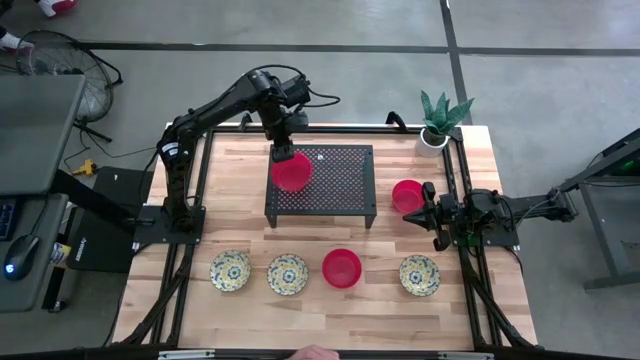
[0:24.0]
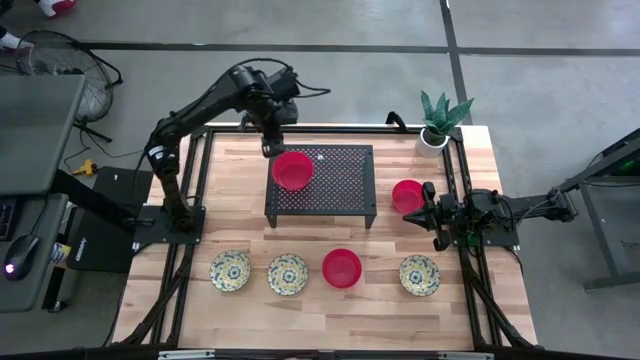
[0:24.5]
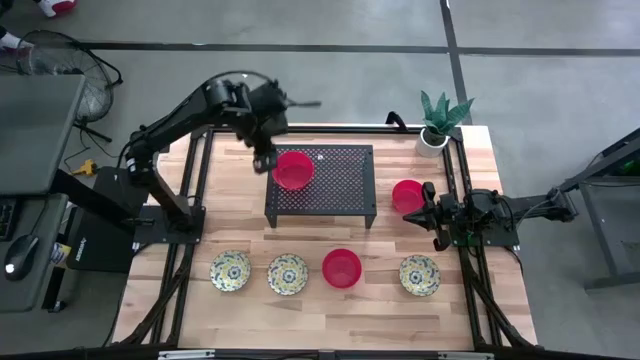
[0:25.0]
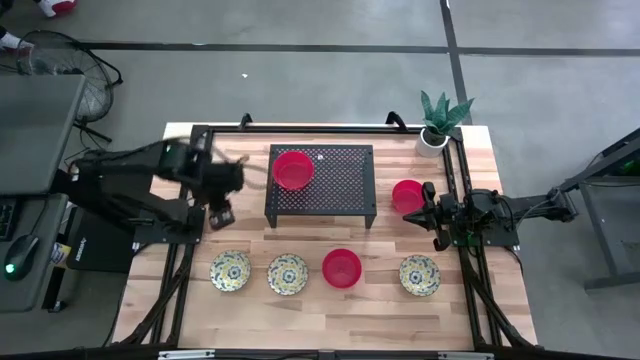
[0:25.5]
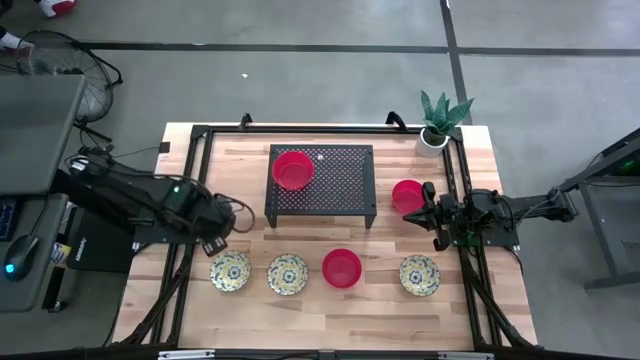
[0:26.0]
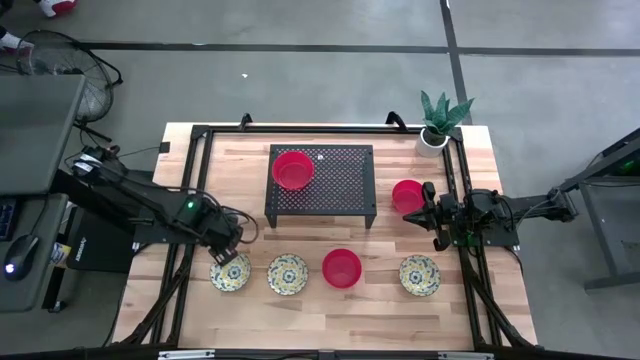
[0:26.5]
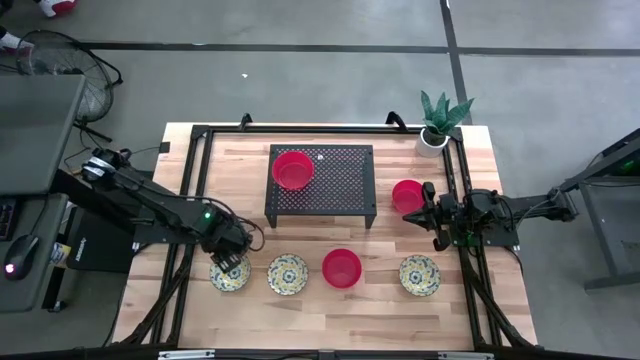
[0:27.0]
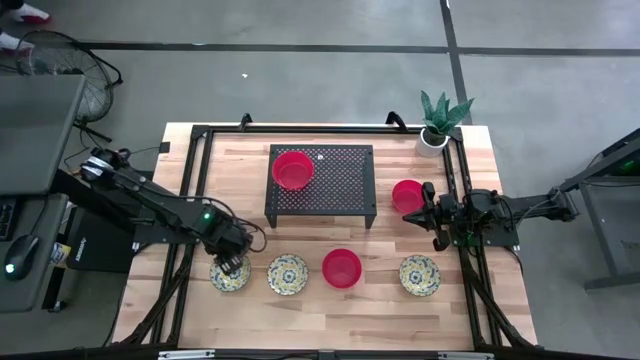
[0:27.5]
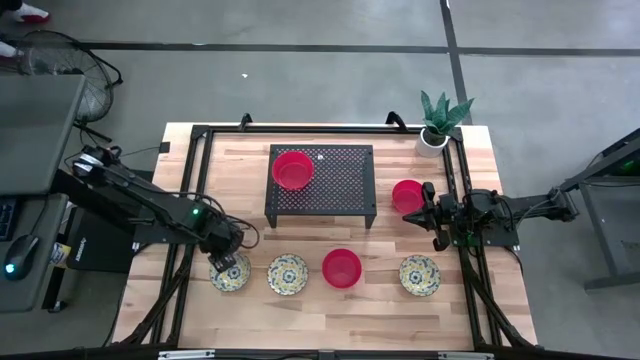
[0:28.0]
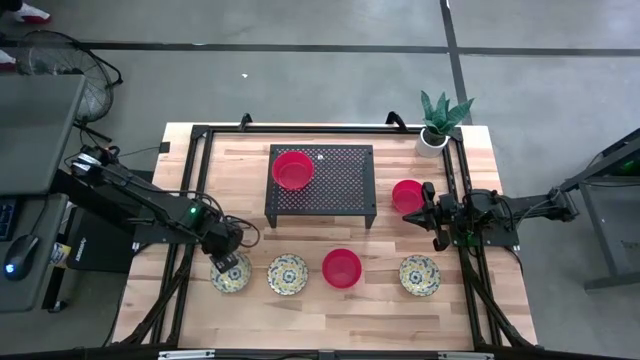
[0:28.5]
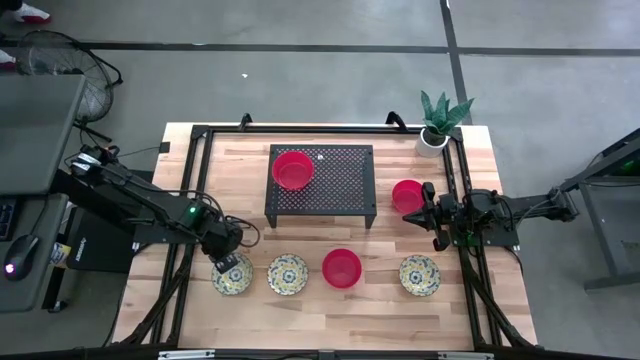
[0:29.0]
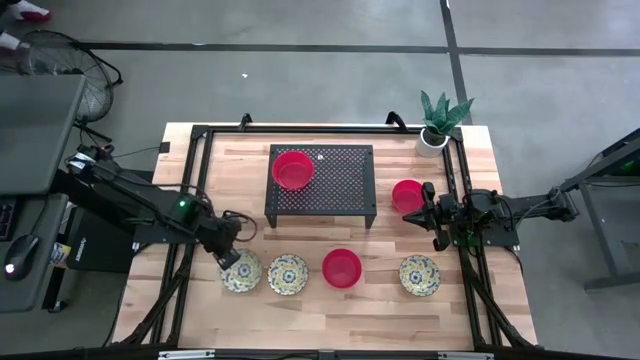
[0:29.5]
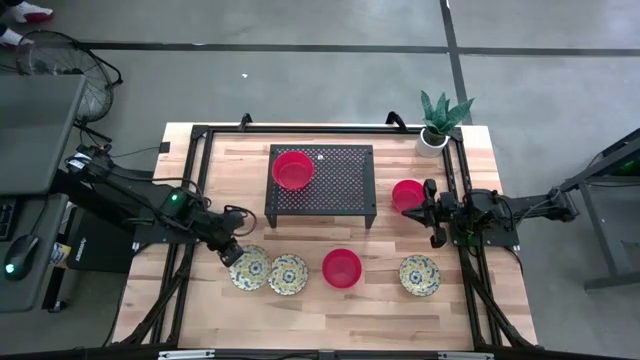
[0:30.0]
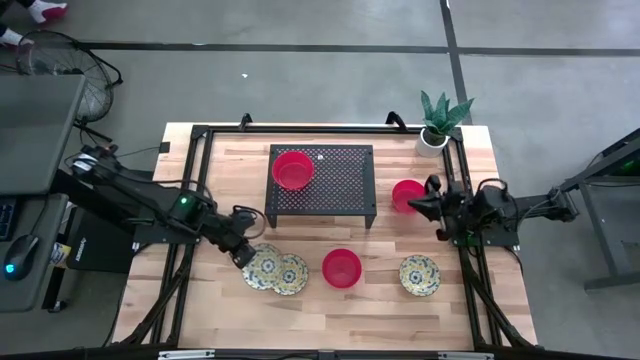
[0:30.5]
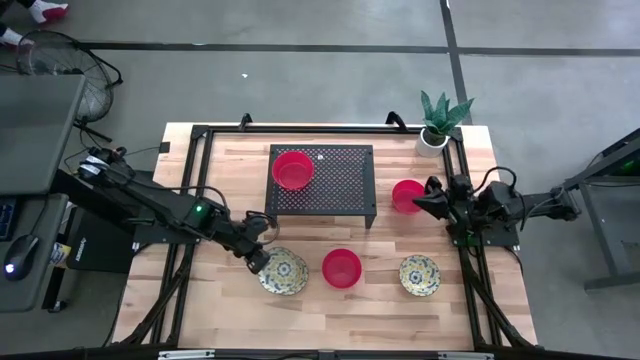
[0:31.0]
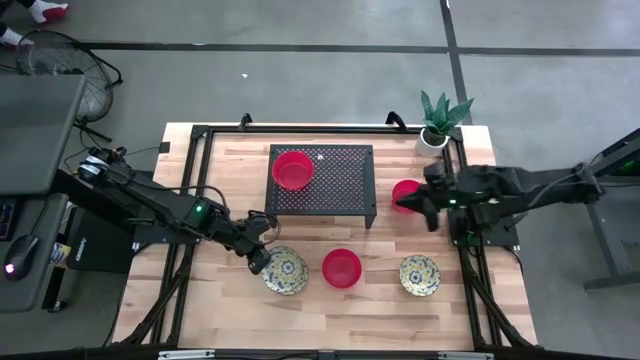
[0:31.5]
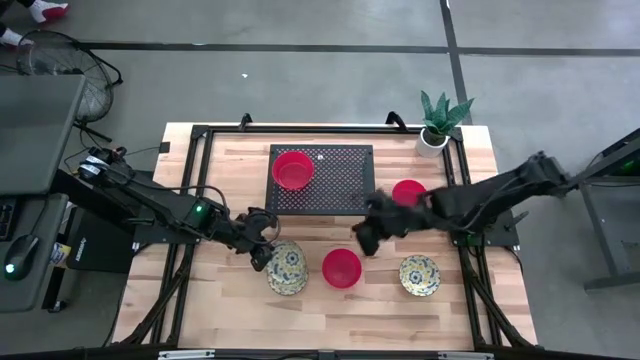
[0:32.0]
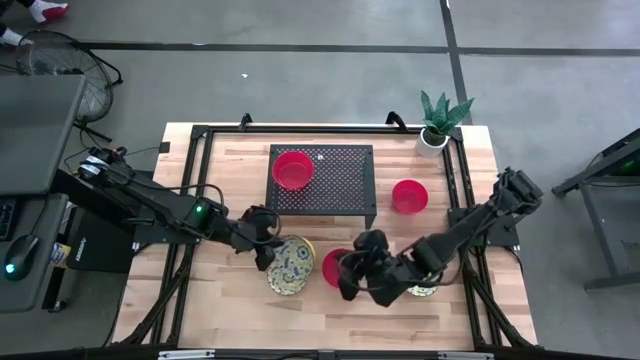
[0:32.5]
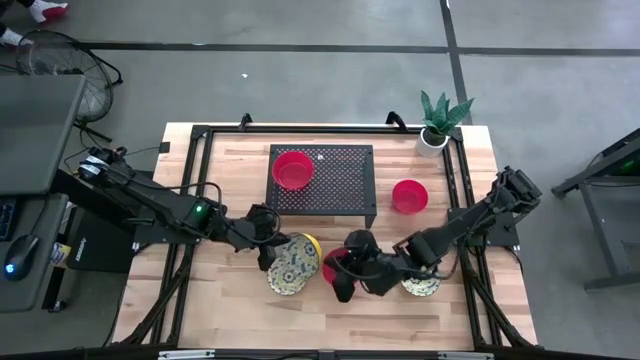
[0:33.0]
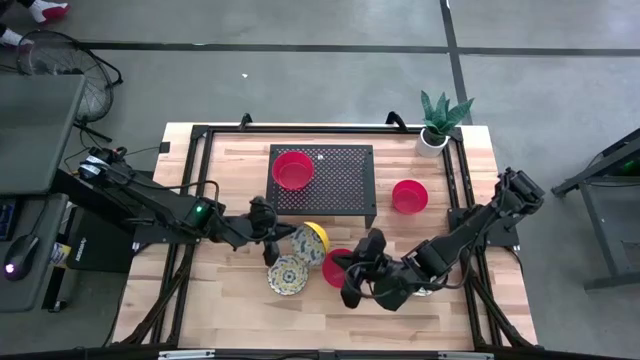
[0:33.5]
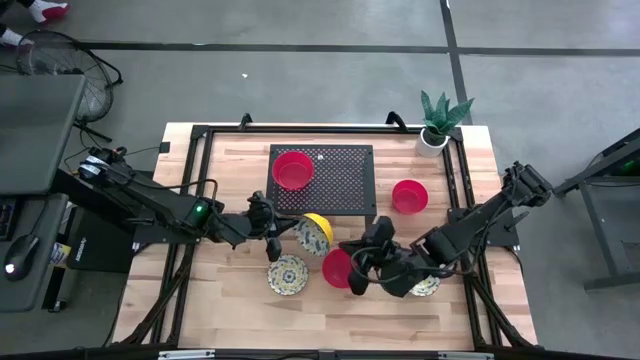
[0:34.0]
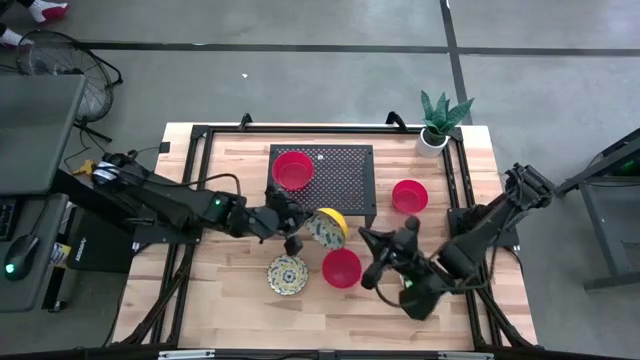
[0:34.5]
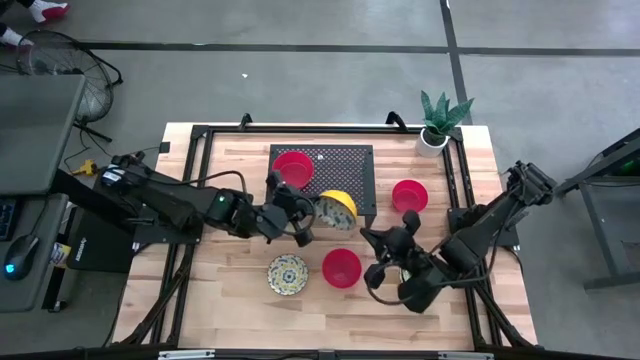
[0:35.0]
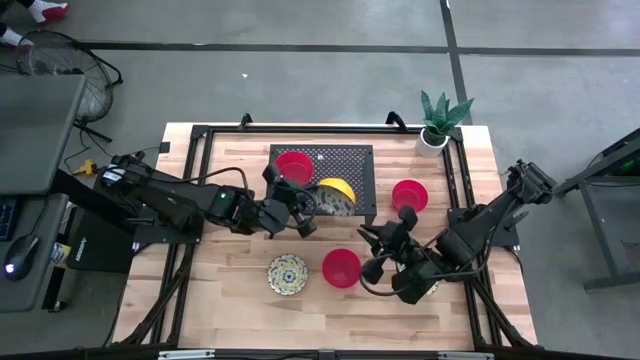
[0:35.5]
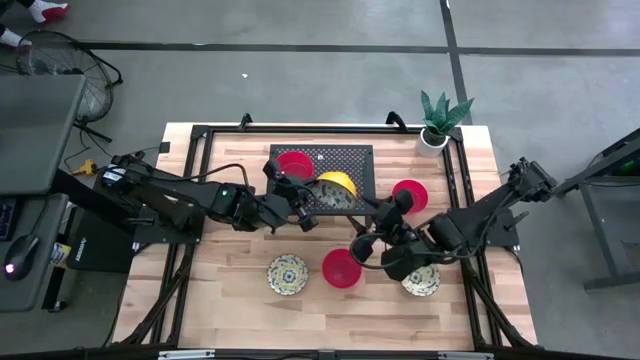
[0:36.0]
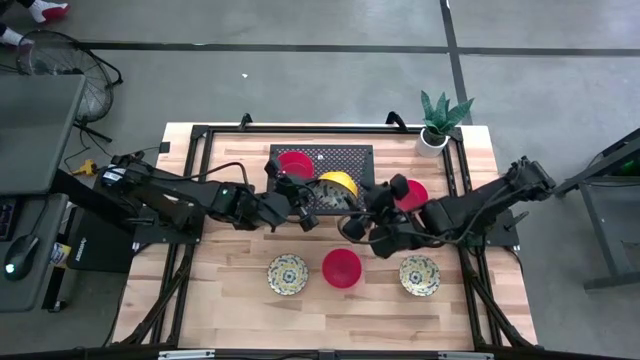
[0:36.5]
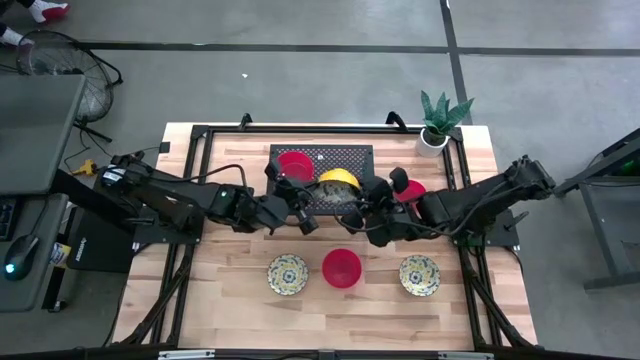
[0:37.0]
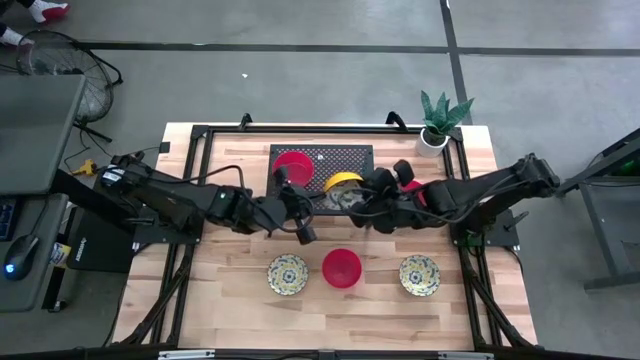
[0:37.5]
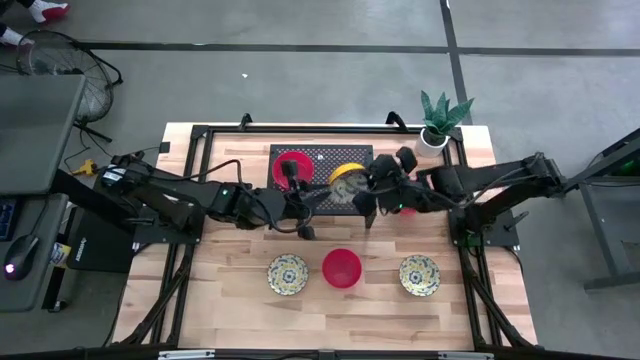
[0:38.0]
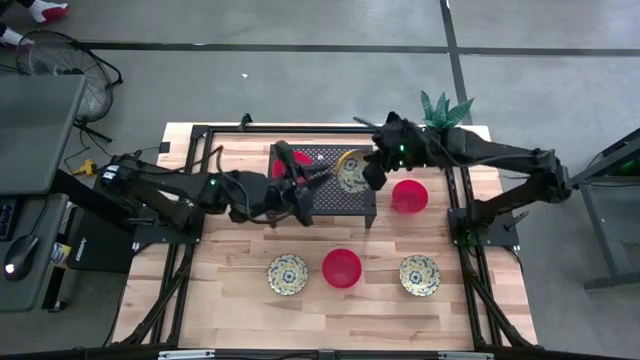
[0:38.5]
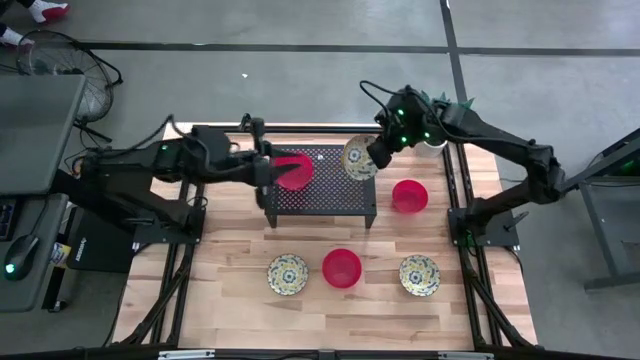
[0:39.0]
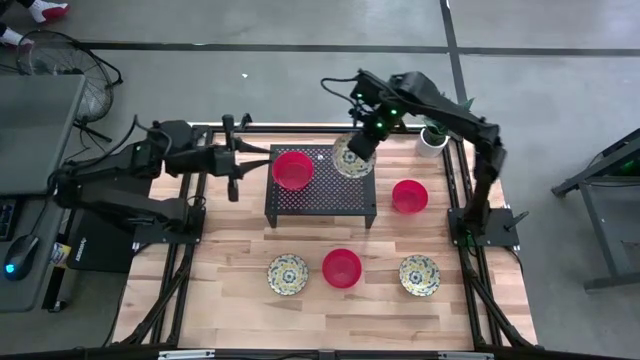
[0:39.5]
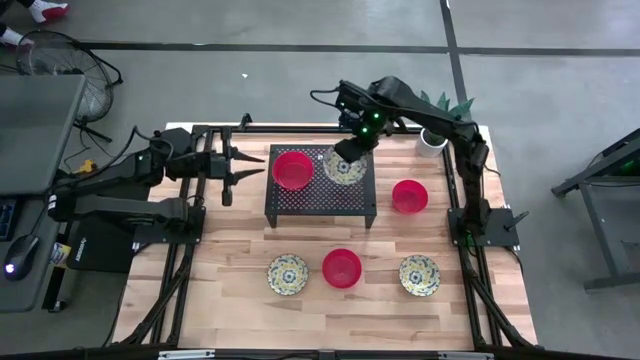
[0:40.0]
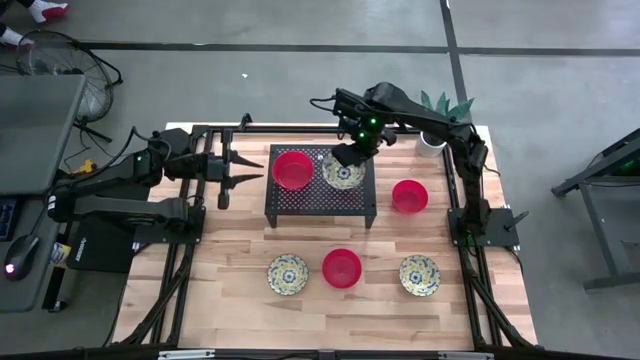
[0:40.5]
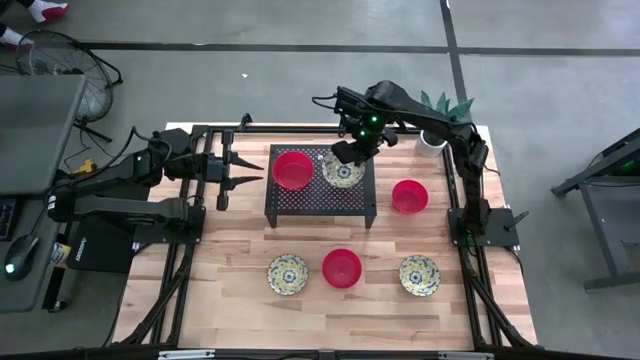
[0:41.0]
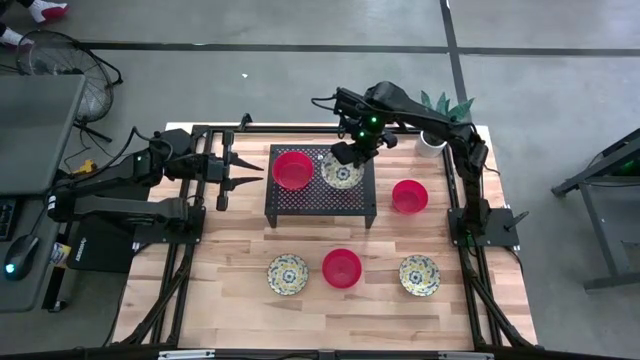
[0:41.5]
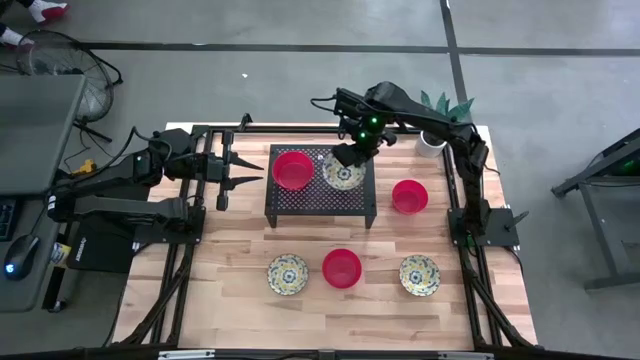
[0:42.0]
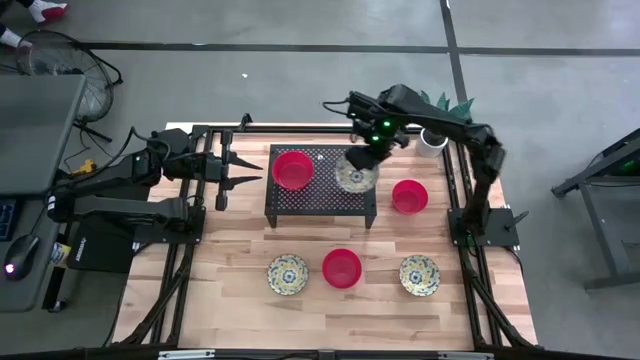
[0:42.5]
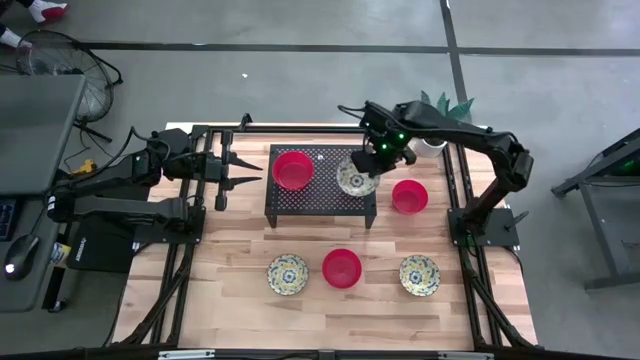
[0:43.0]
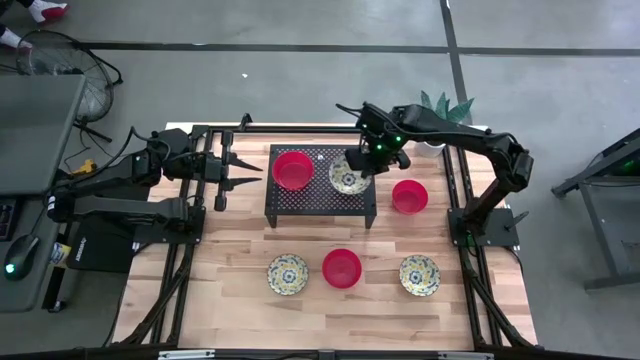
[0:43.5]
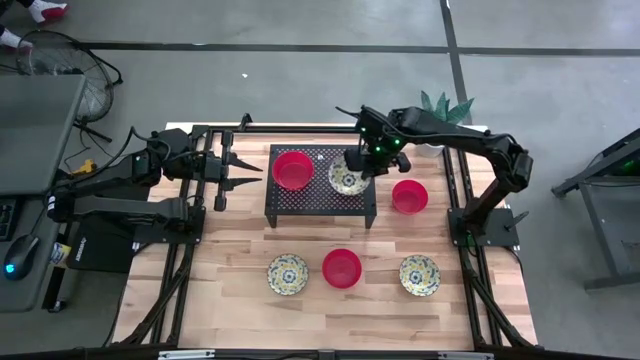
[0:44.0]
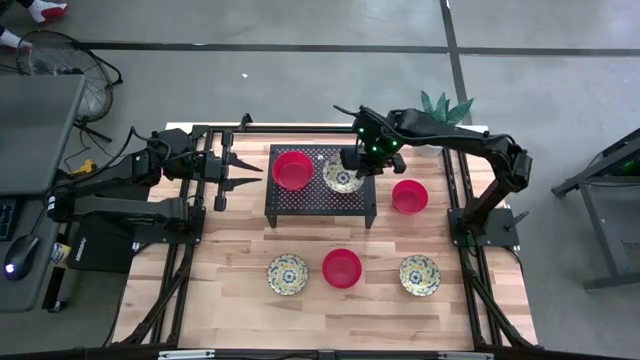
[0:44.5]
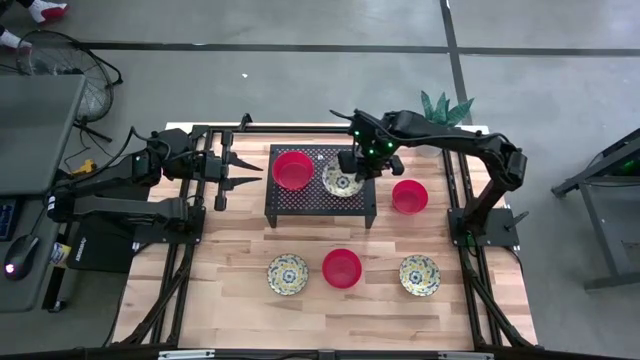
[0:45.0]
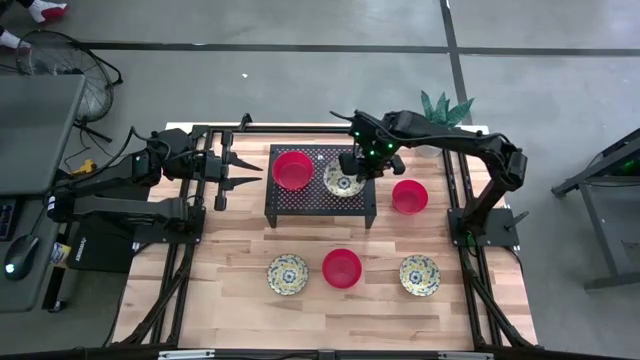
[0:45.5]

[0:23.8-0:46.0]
Task: Pick & Place Mini bowls
Put the left yellow patterned bowl on the shelf
